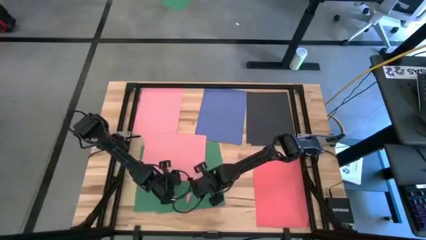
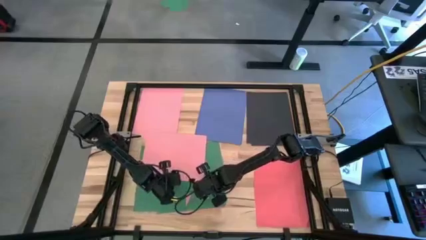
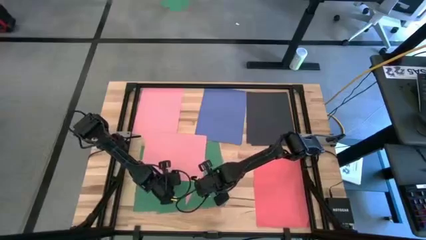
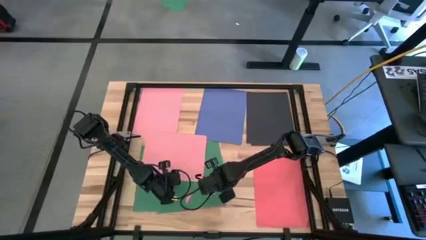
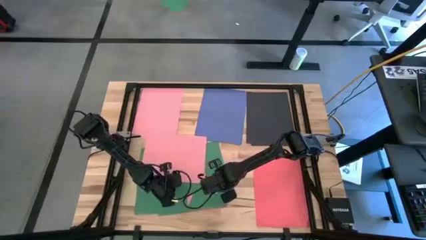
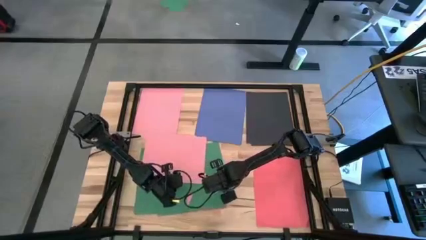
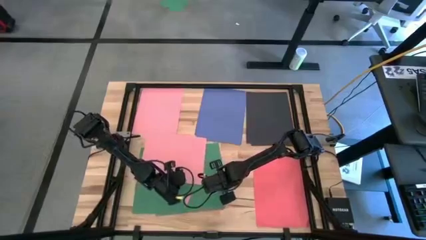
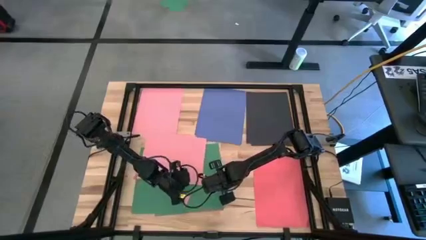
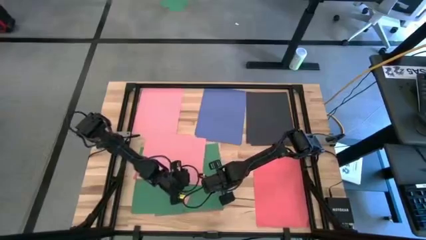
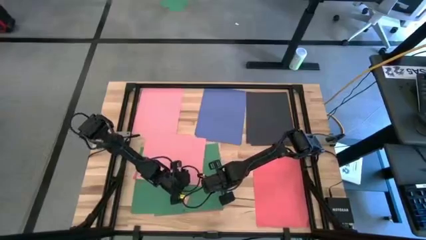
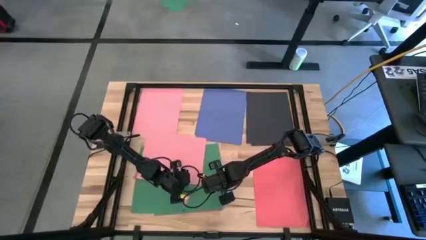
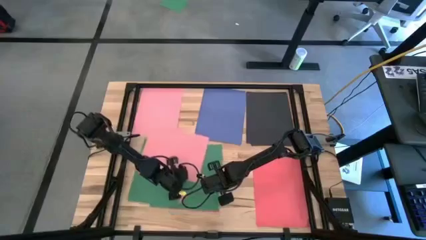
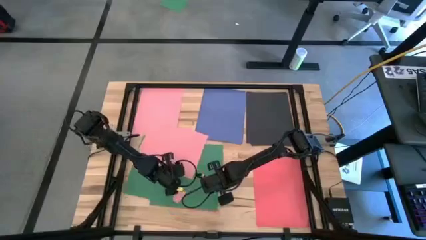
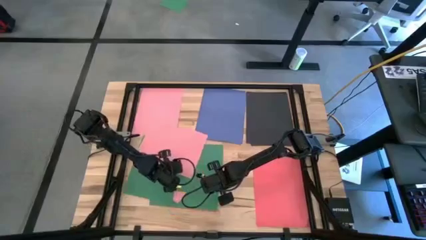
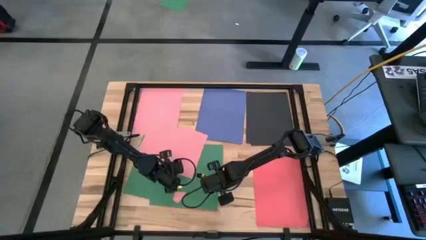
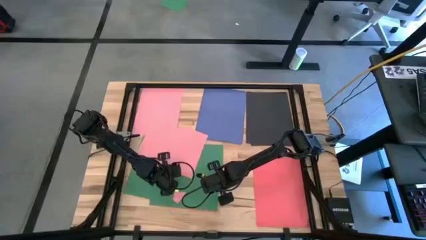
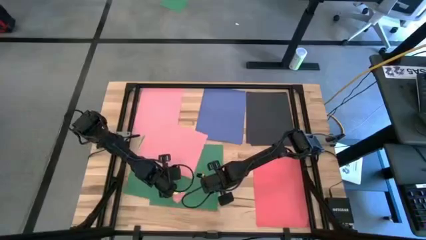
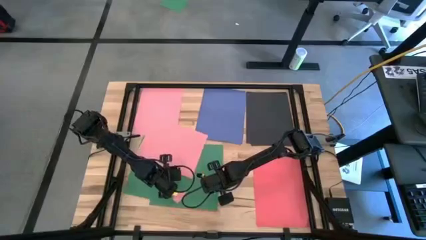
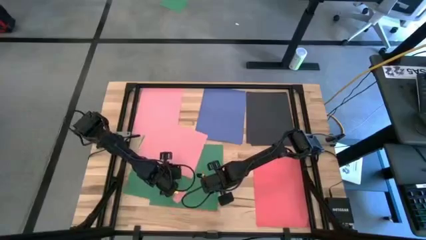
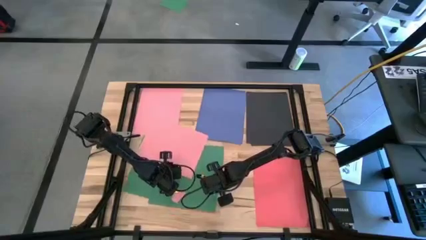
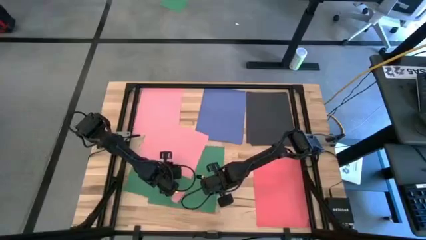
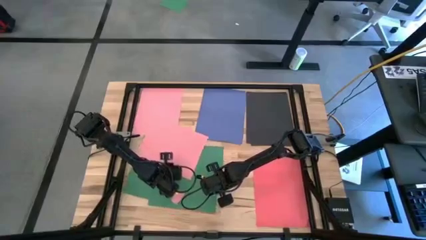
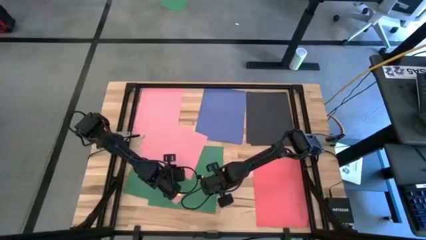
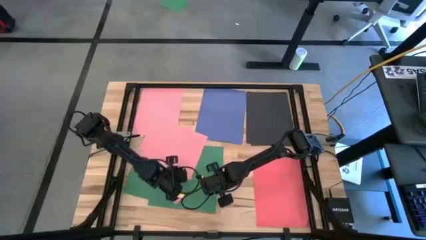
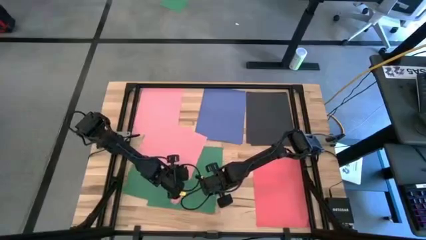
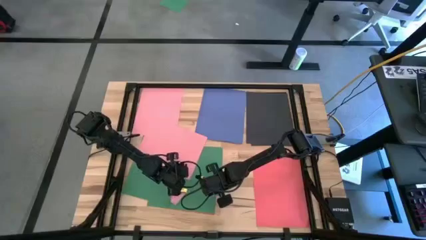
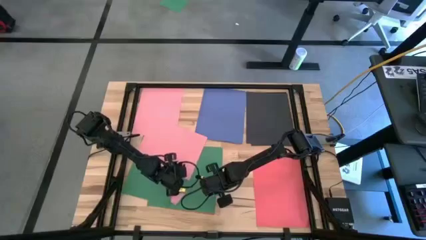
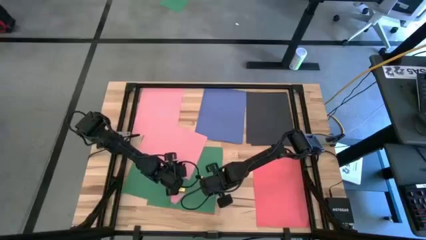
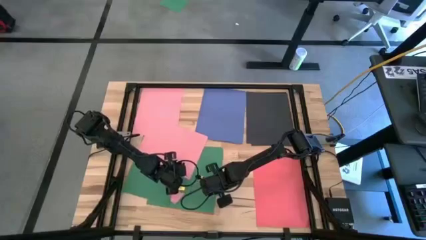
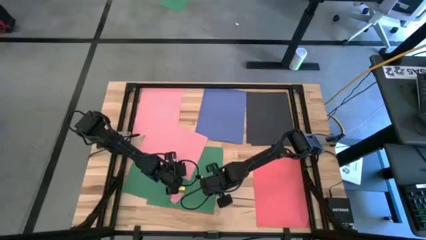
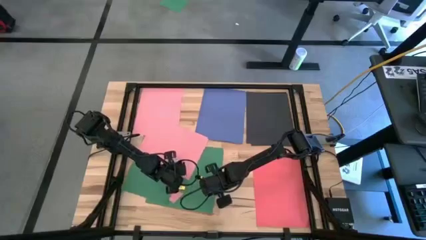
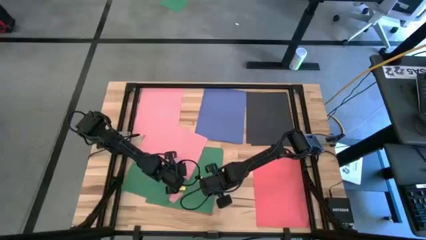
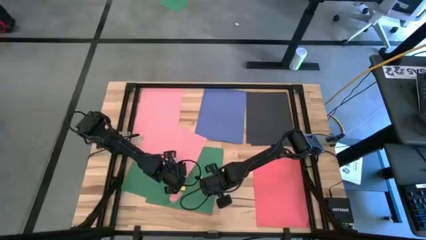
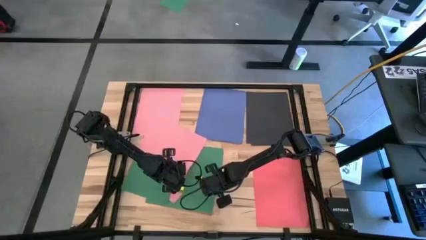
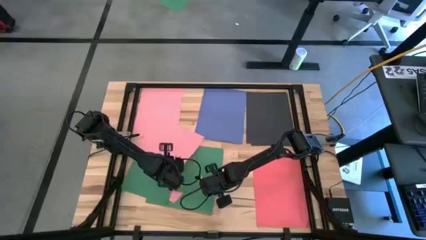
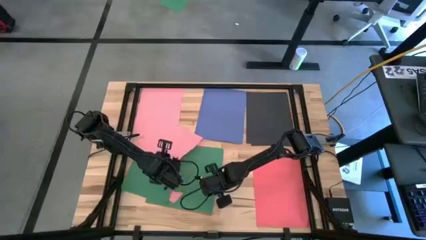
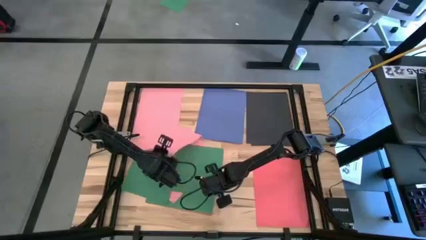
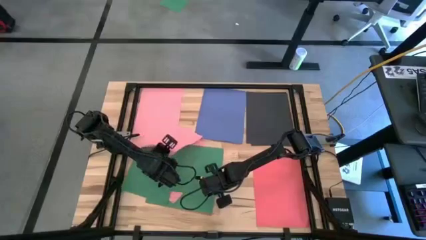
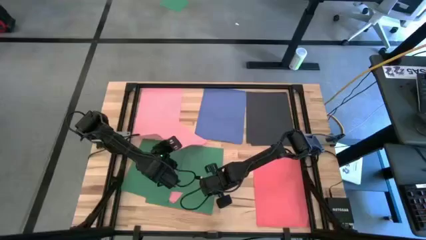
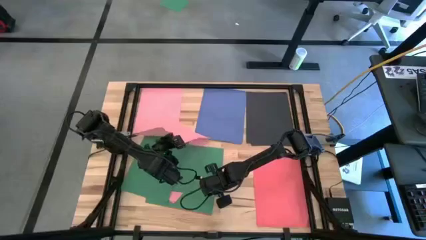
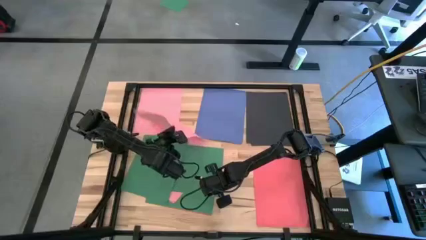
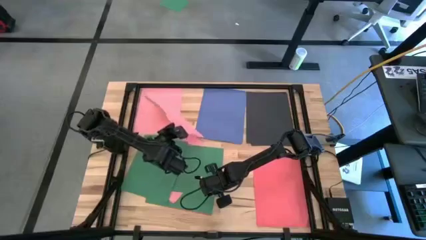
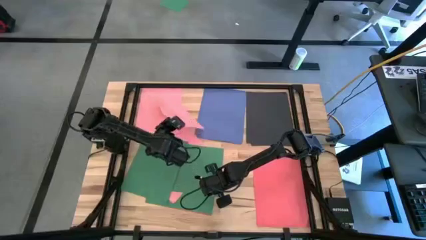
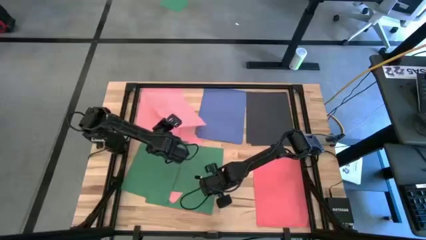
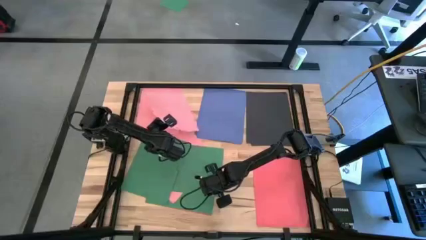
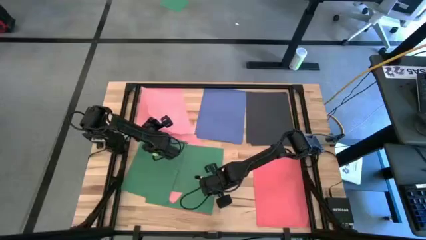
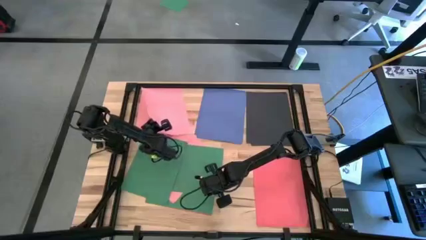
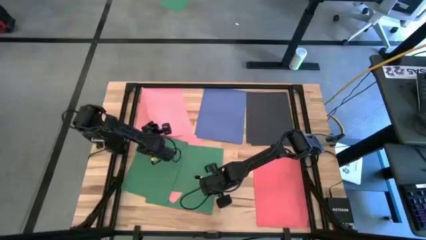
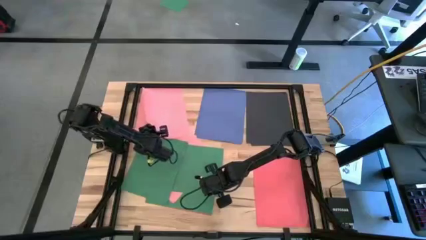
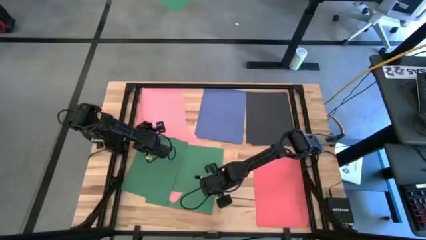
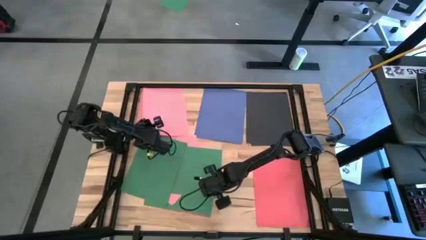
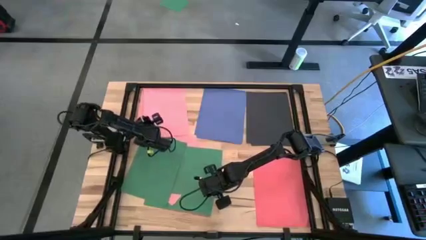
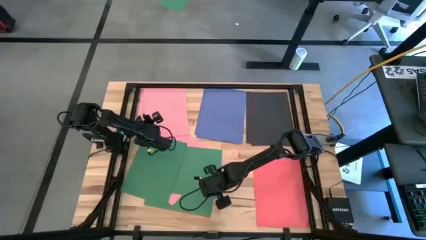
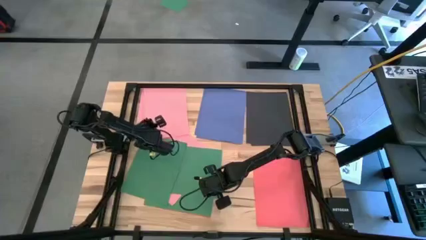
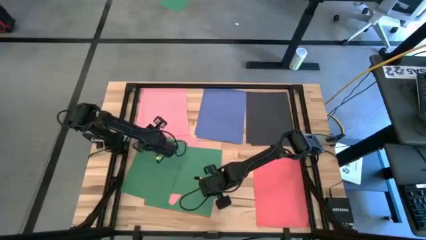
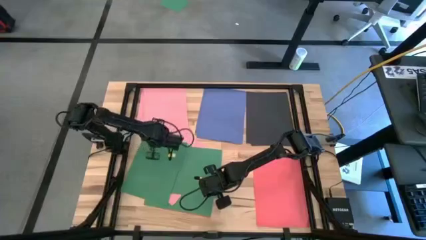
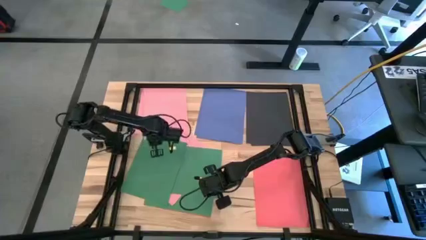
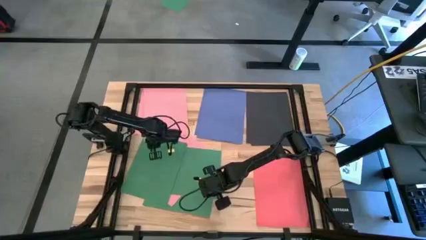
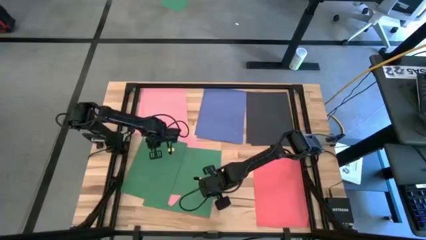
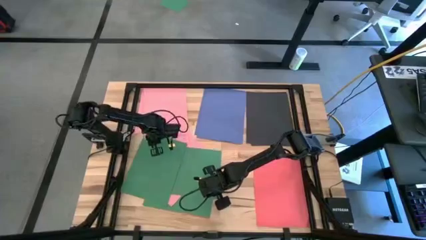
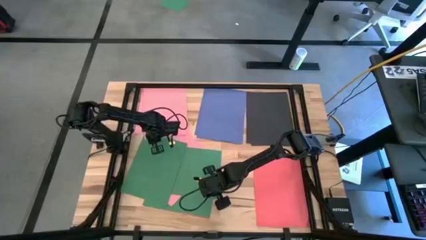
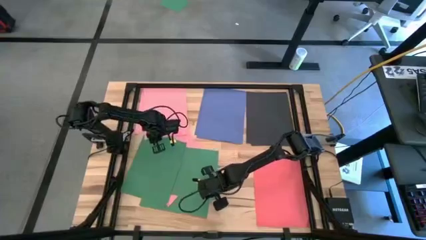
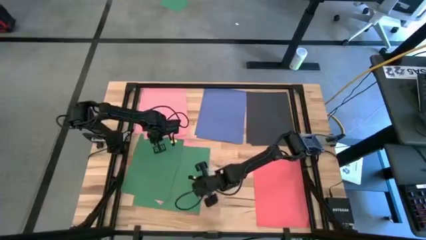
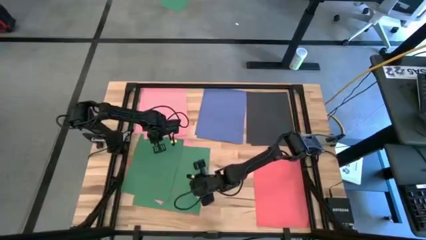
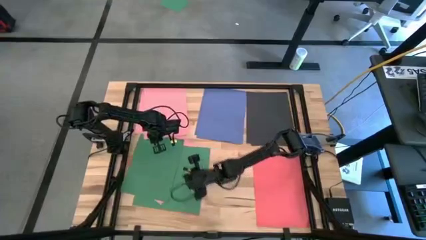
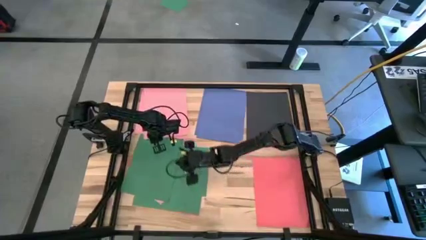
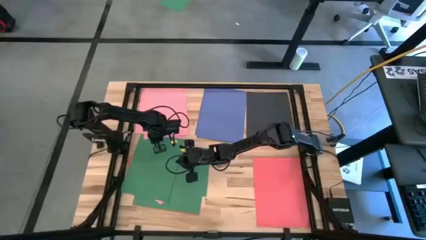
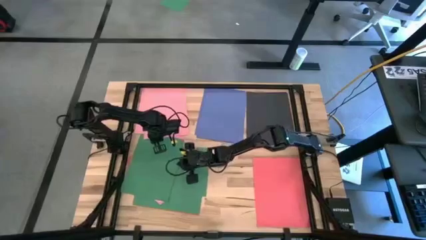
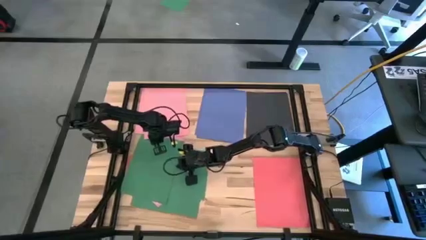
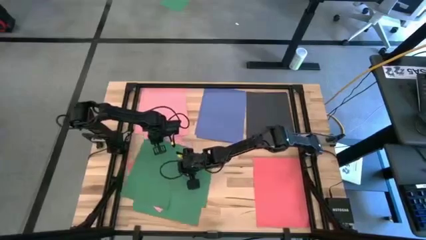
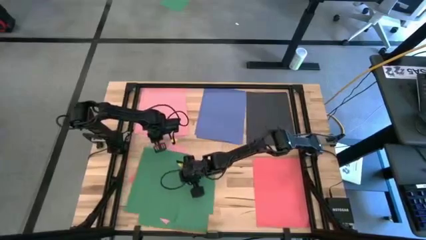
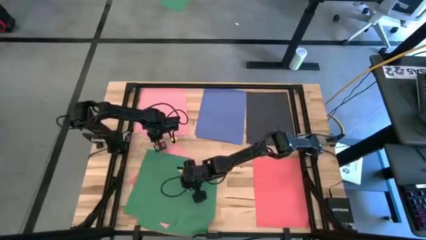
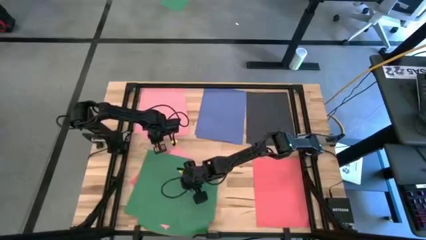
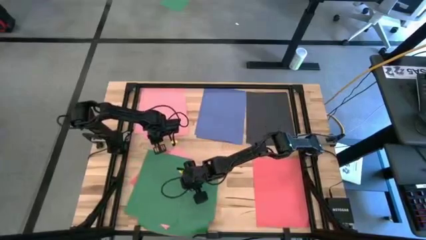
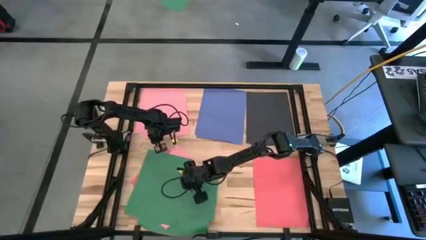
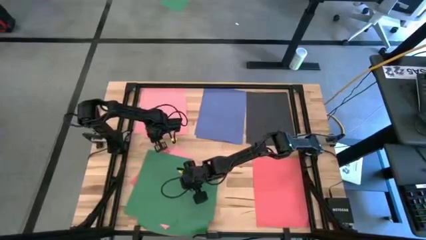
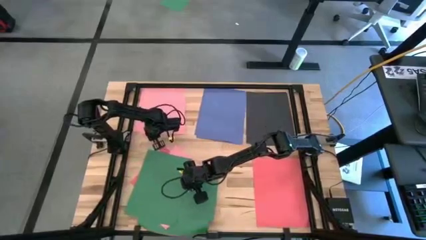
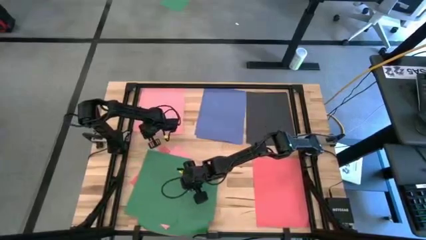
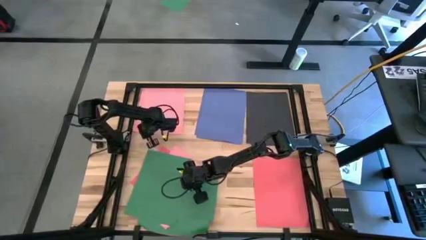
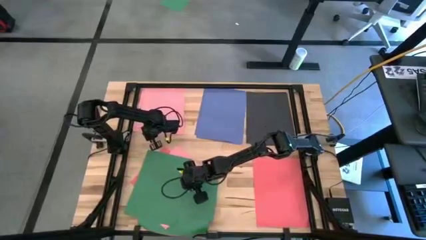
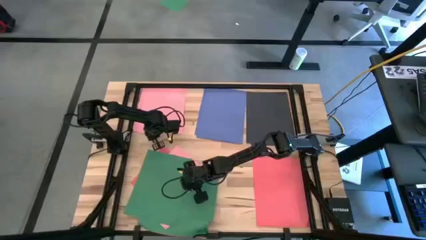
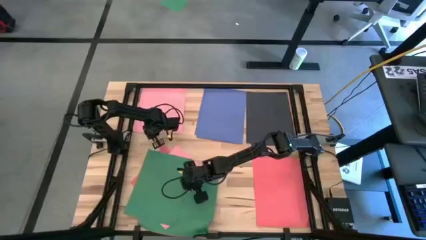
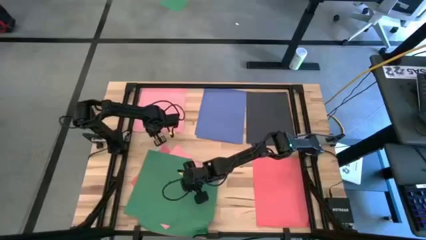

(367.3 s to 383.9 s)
Task: Organize paper
Stack the pink paper on top of the other pink paper on the table
